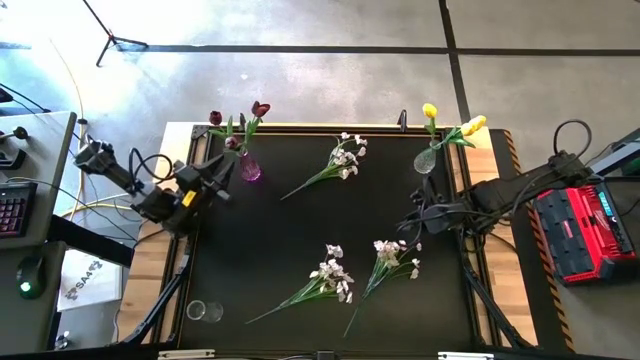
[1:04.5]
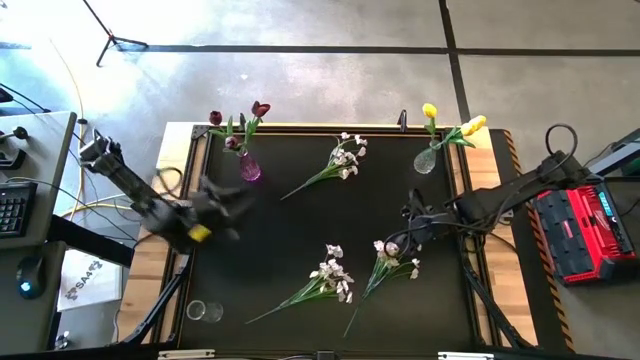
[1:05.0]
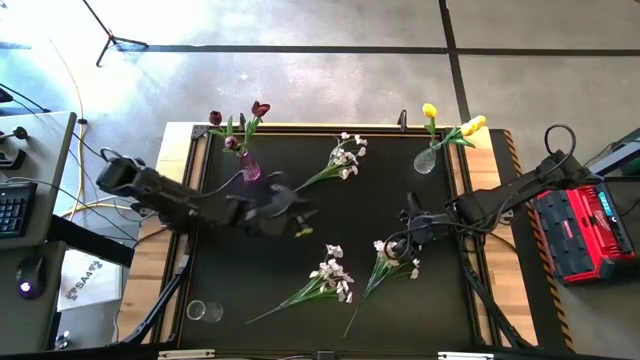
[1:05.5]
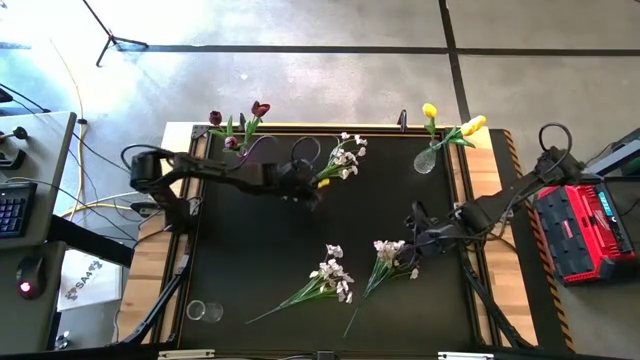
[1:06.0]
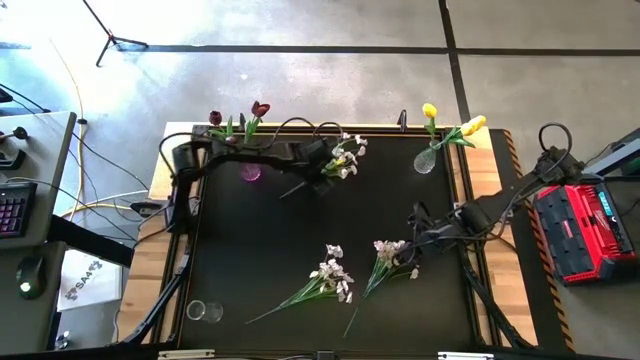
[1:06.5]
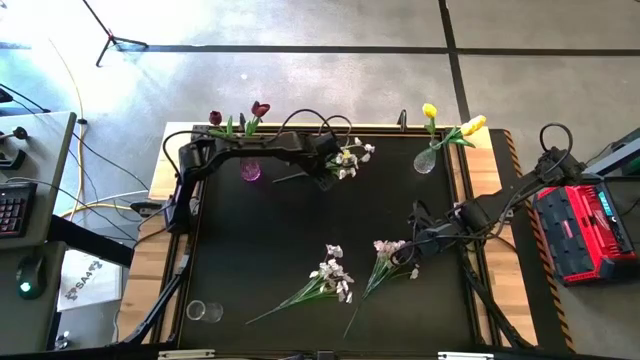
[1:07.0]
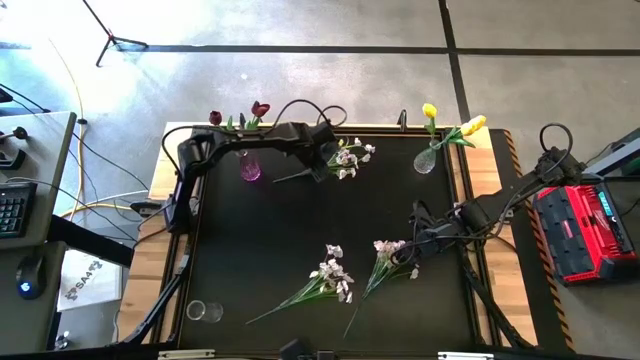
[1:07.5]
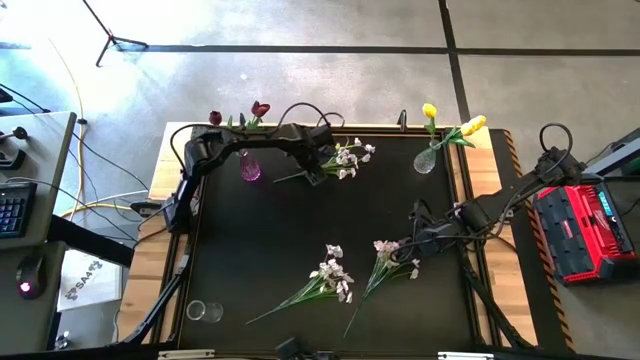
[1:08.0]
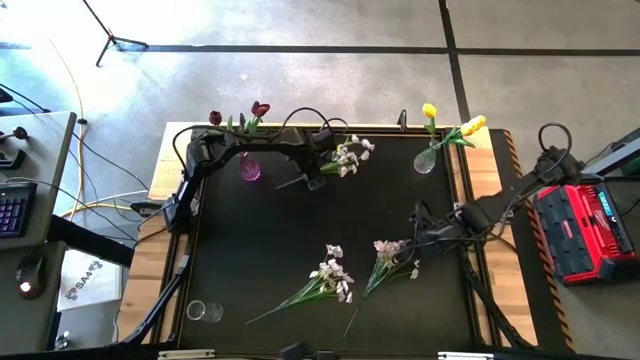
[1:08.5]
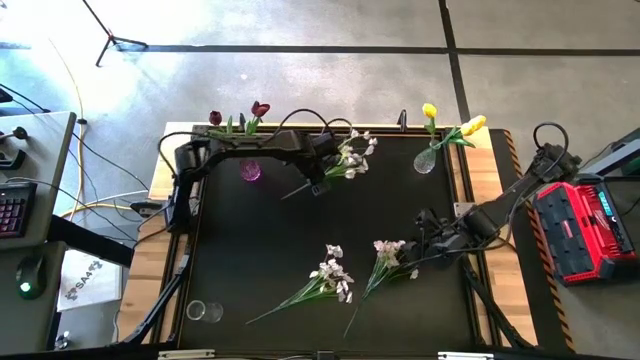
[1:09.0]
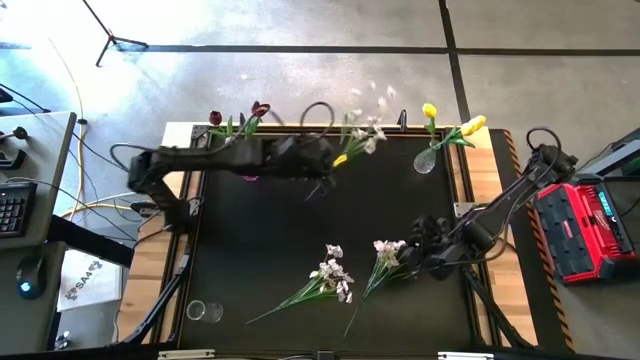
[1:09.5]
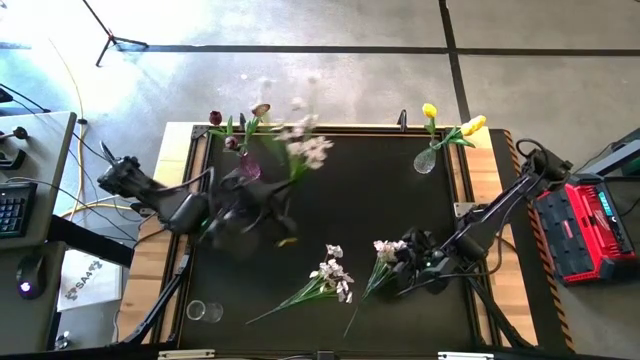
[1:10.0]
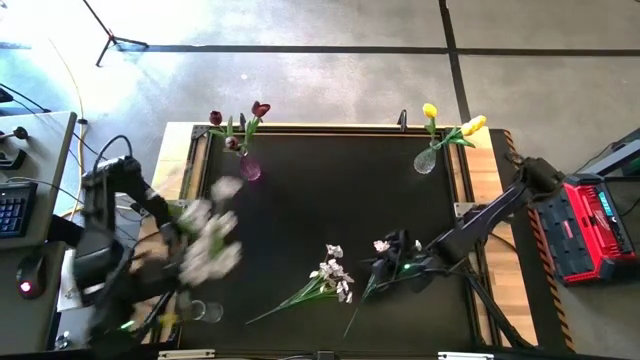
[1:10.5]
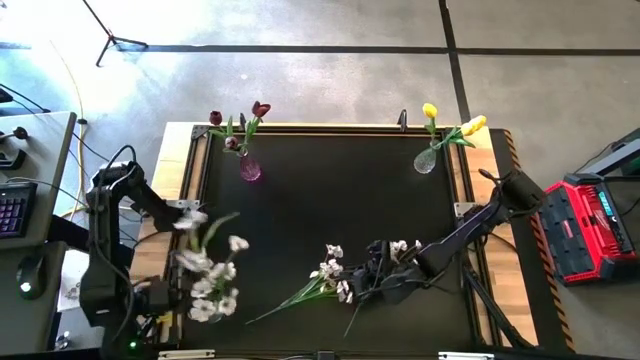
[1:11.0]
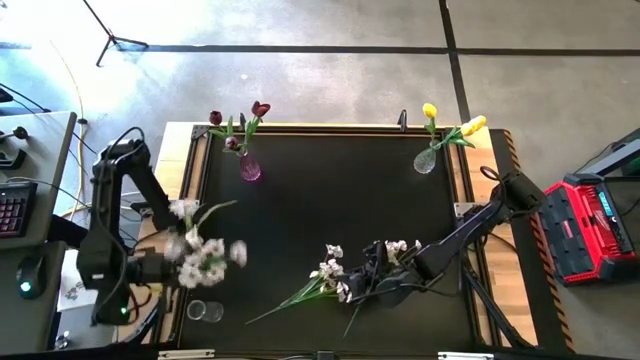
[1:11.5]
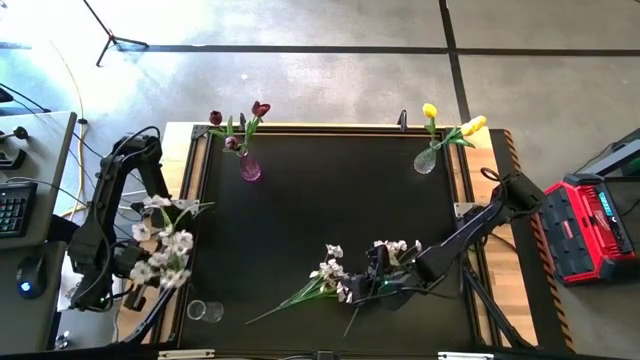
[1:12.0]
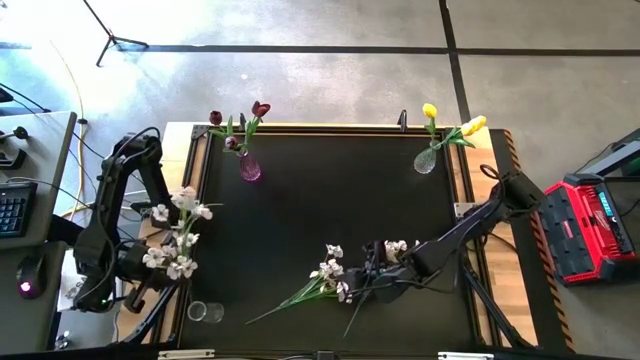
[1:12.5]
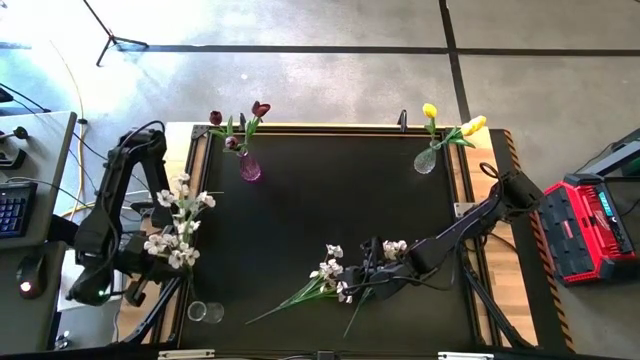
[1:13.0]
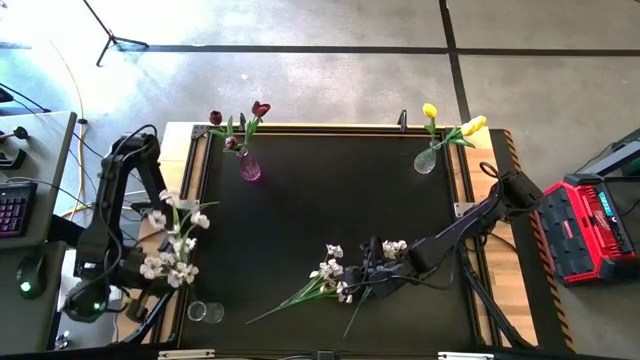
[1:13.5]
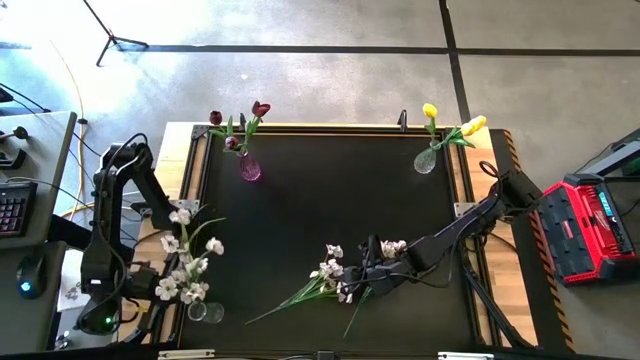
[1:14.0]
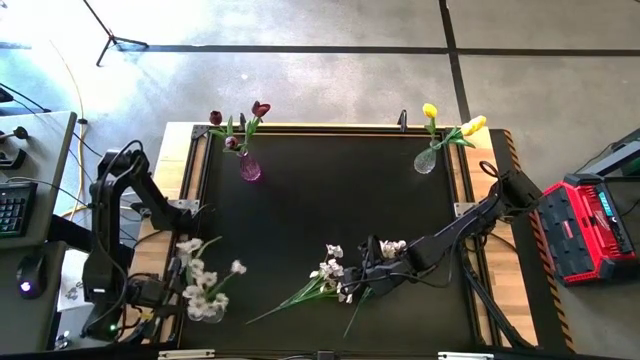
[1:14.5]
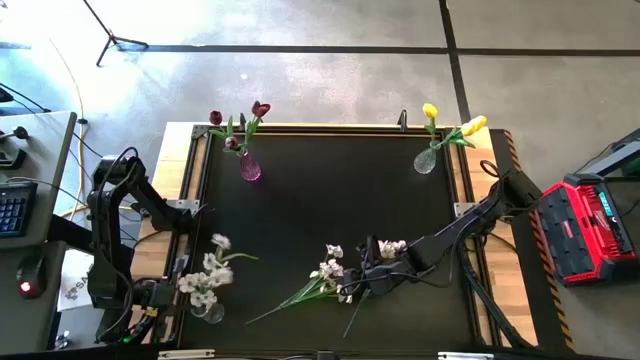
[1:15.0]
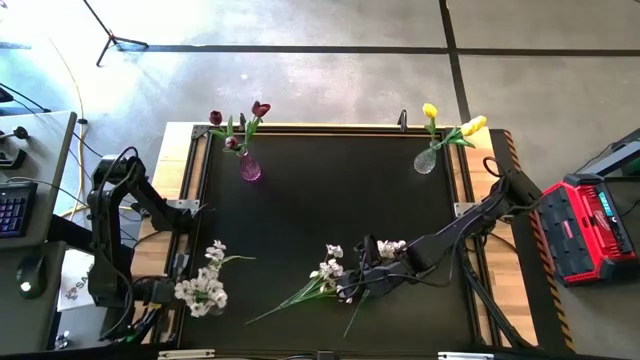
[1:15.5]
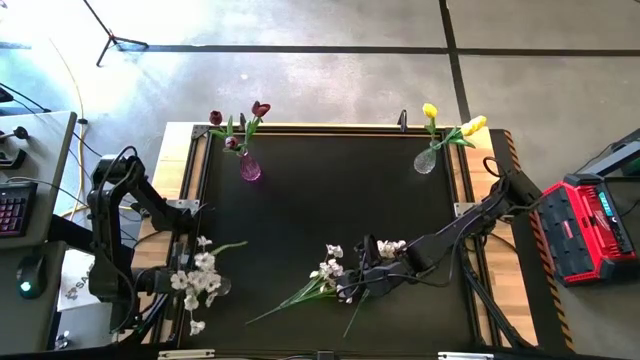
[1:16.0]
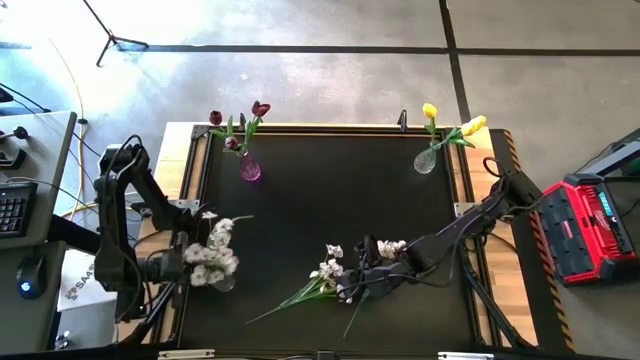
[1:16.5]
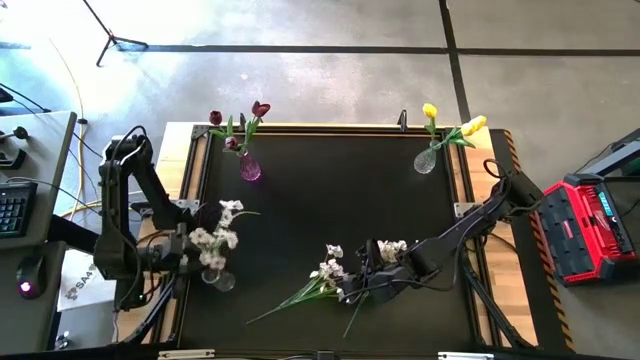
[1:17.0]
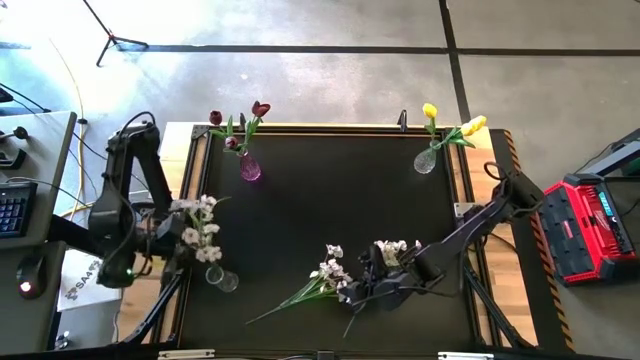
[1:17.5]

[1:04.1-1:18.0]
Task: Sort flowers into vase by color
Put the top white flowers into the bottom transparent flower vase

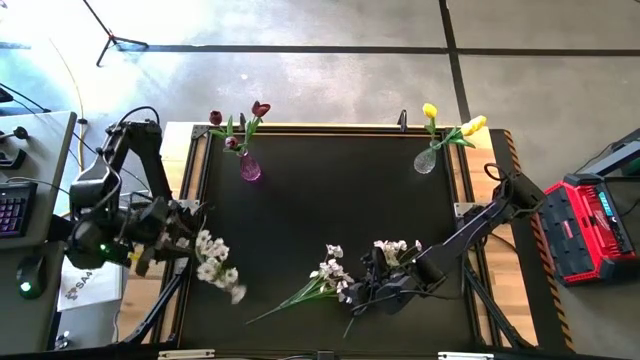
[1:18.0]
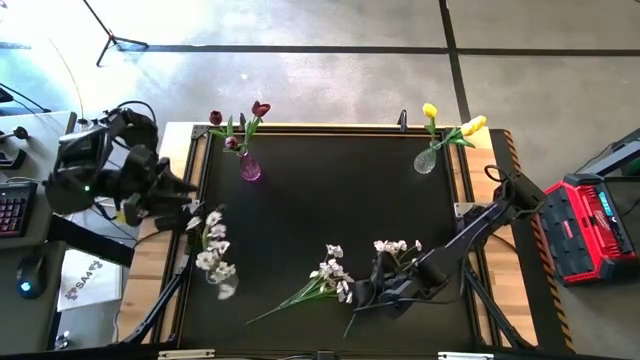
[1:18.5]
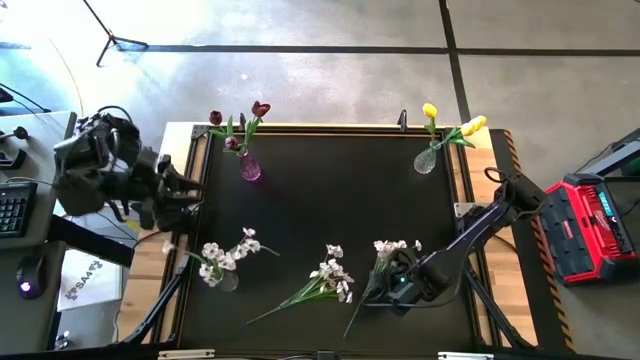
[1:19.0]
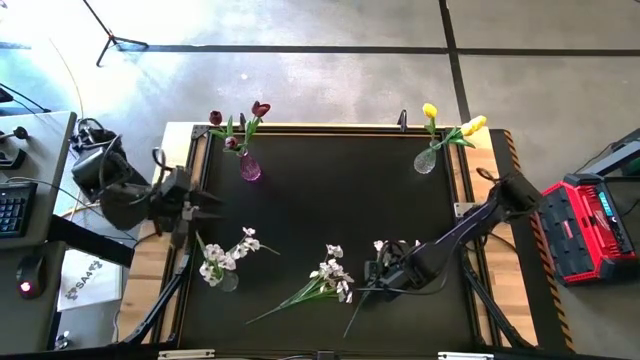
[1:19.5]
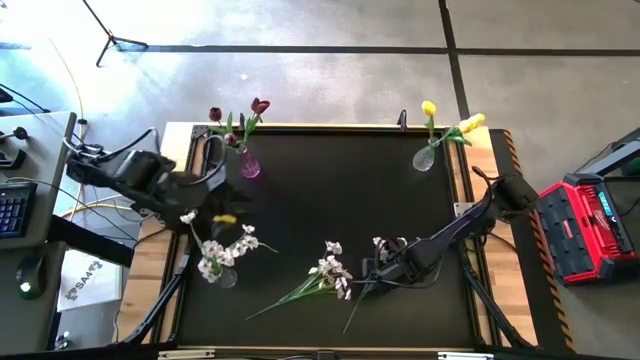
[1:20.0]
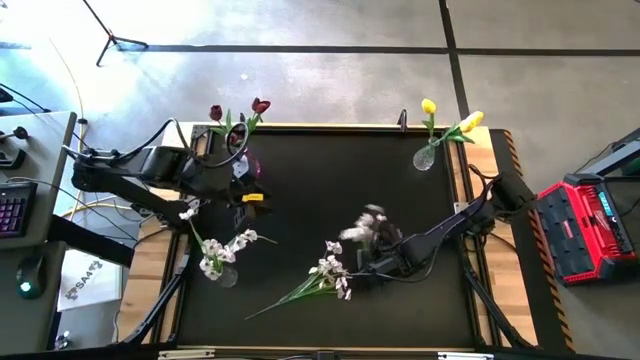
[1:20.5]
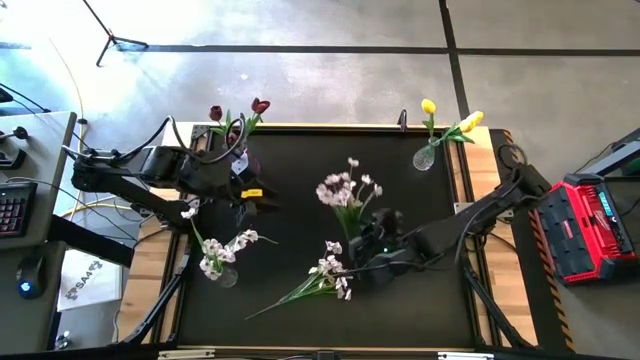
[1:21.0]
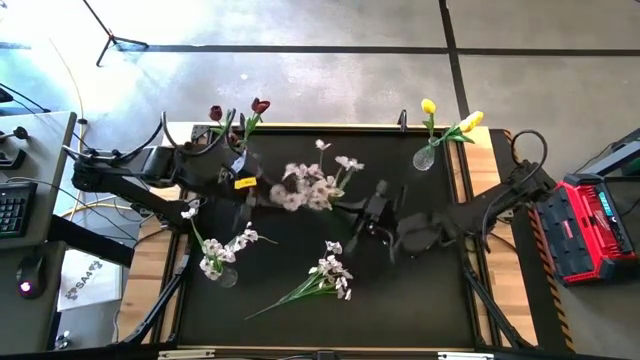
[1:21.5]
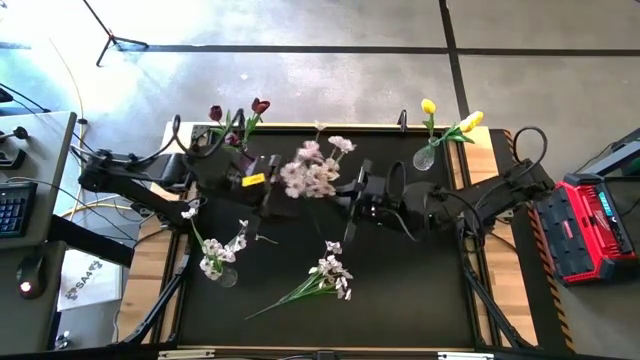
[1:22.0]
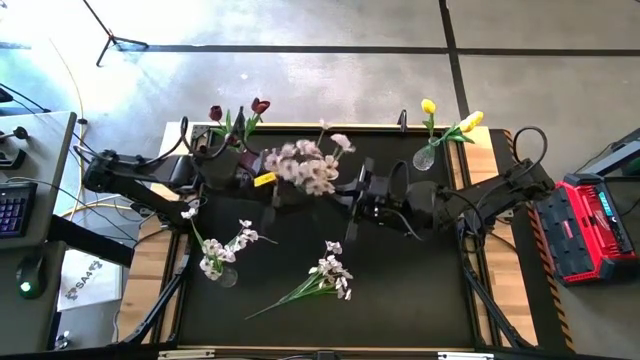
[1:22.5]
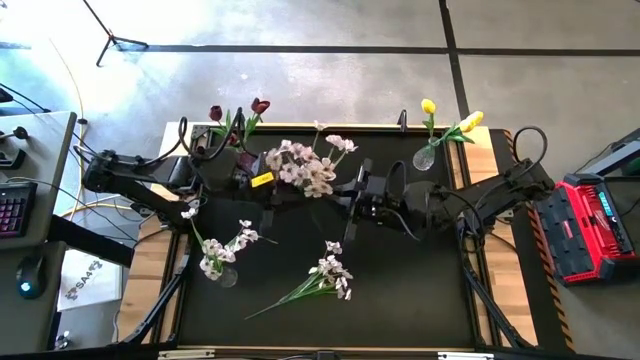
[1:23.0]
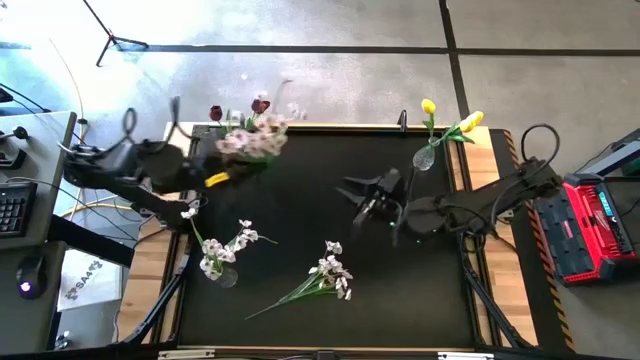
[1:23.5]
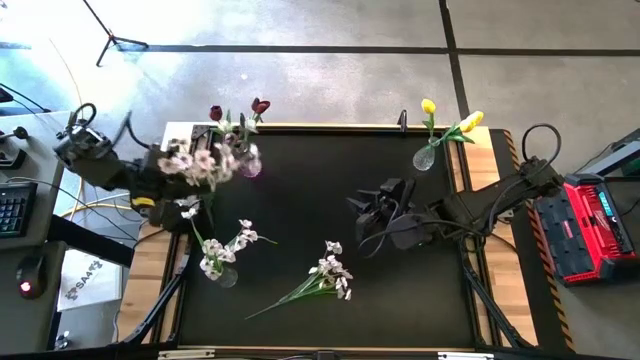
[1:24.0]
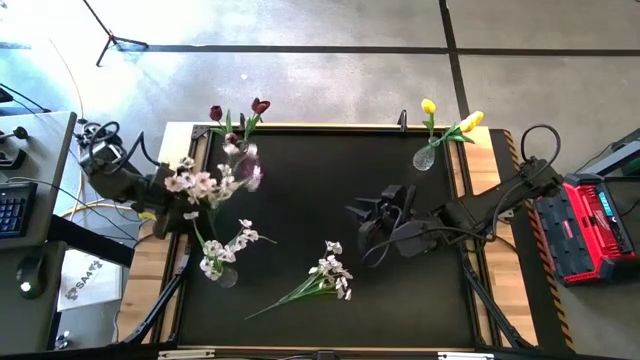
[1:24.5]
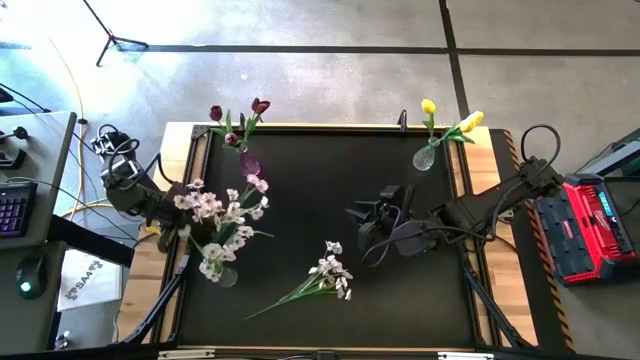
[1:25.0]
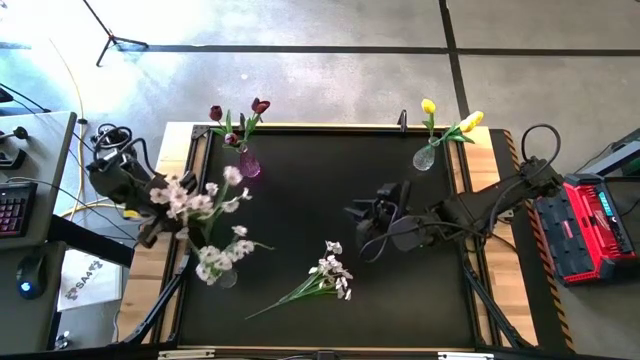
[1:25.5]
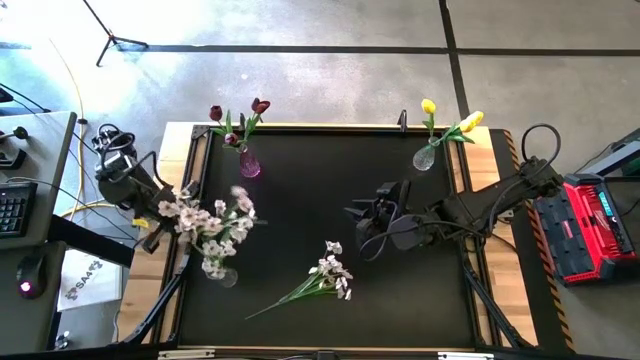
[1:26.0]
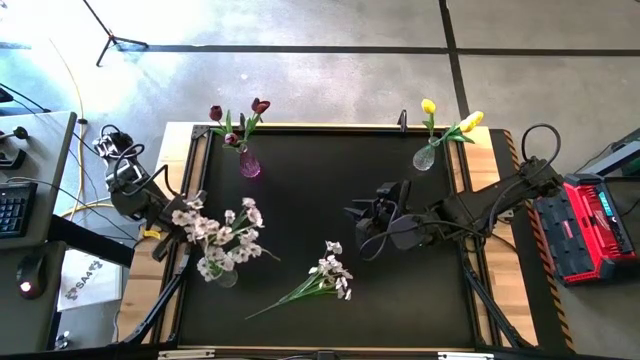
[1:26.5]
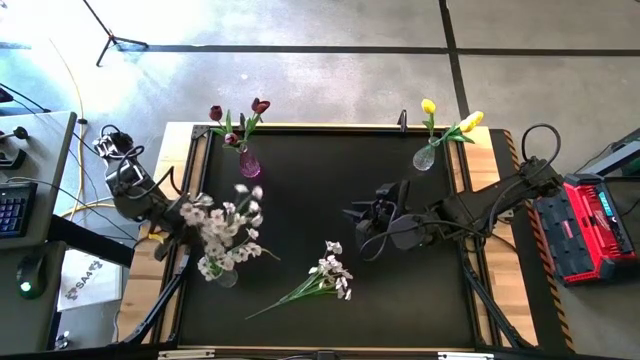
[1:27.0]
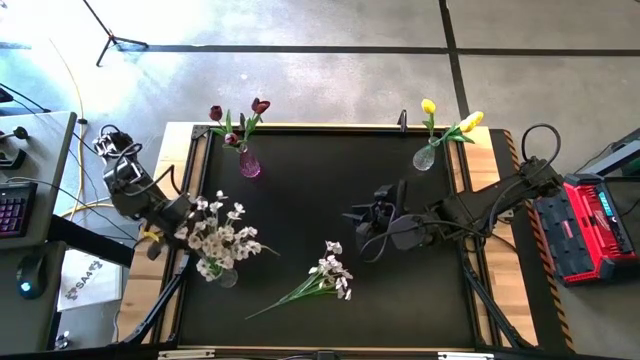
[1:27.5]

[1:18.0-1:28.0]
Put the right white flowers into the bottom transparent flower vase
